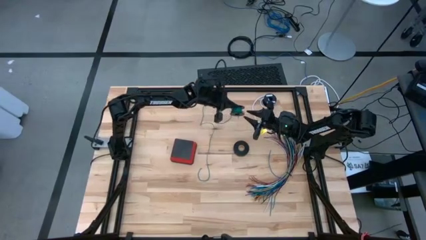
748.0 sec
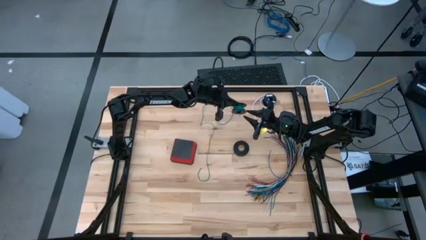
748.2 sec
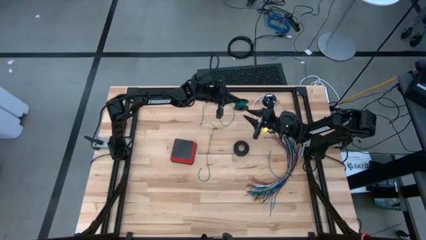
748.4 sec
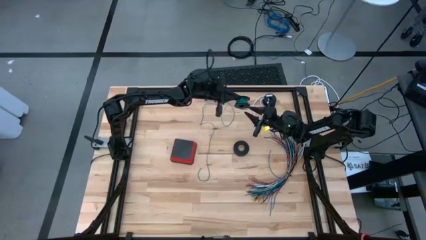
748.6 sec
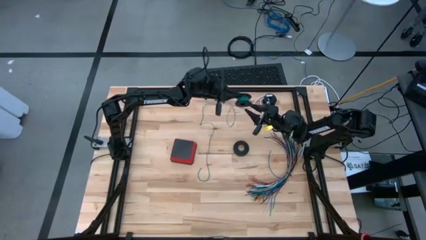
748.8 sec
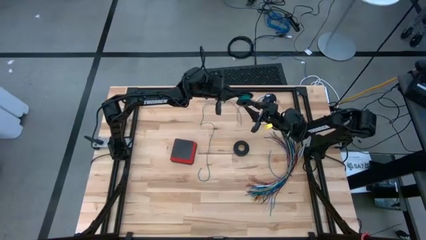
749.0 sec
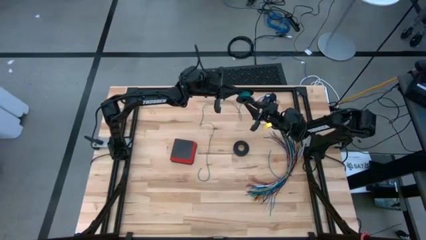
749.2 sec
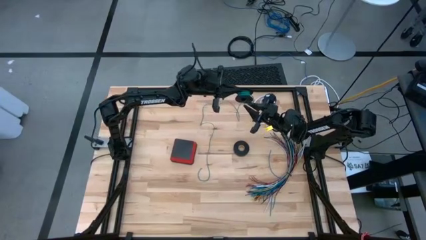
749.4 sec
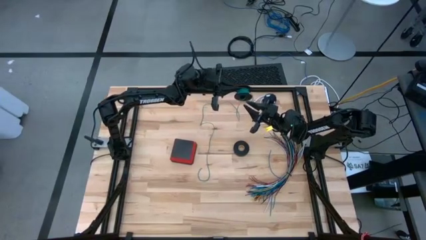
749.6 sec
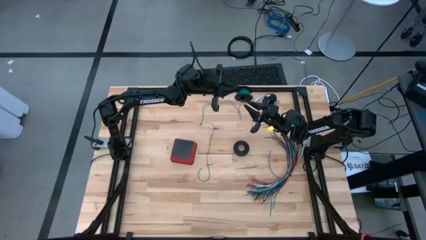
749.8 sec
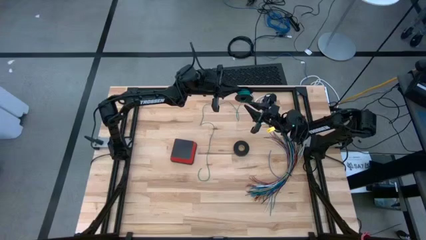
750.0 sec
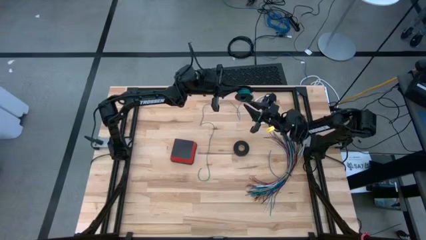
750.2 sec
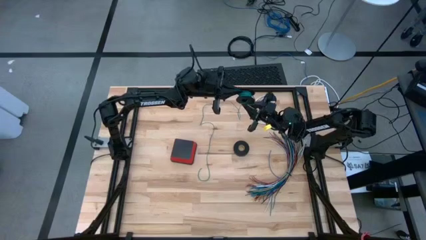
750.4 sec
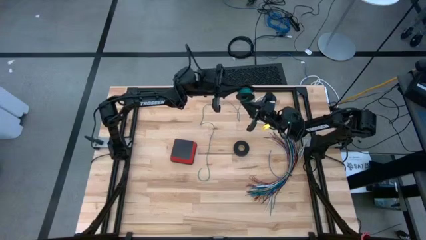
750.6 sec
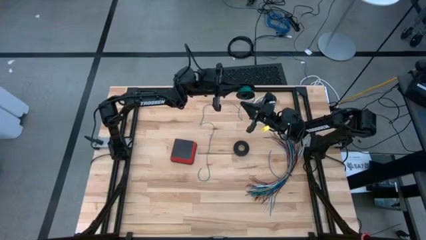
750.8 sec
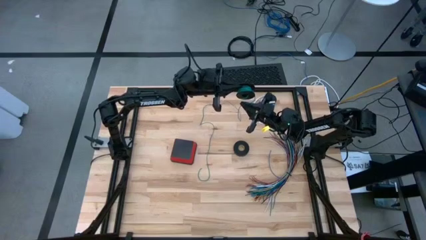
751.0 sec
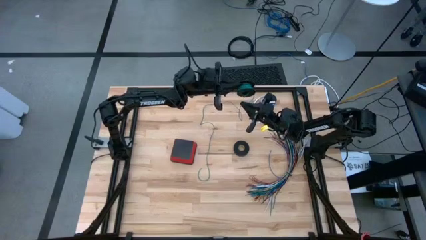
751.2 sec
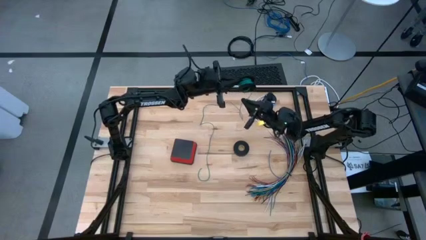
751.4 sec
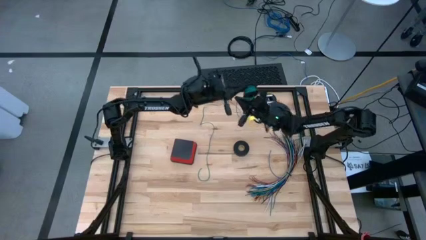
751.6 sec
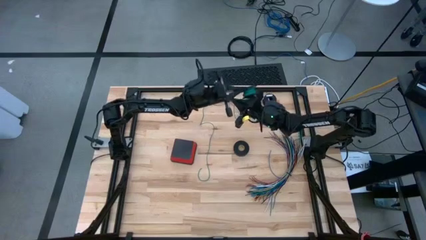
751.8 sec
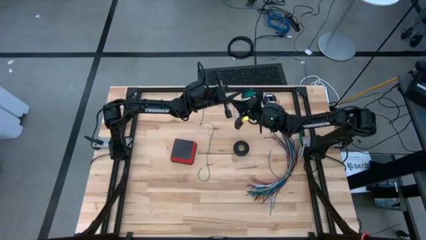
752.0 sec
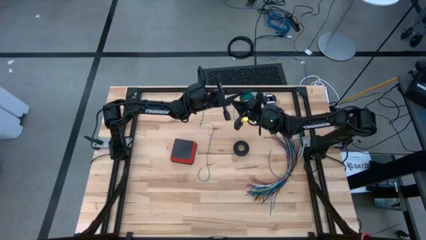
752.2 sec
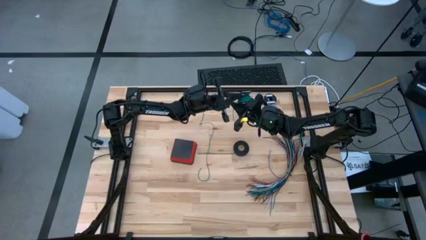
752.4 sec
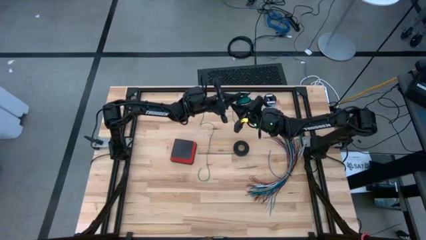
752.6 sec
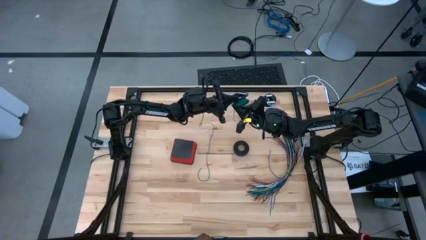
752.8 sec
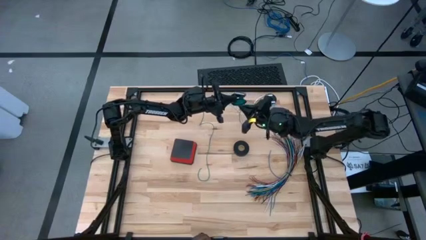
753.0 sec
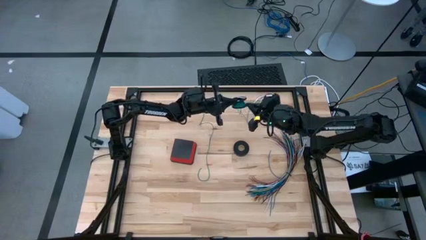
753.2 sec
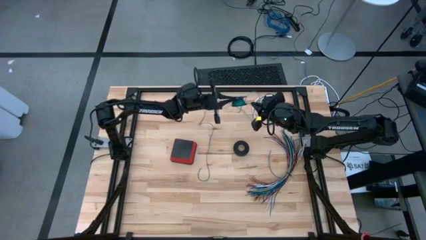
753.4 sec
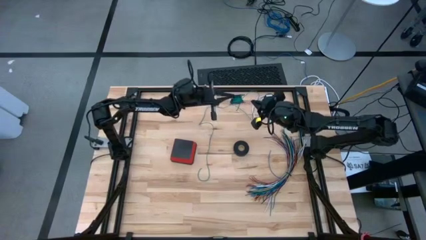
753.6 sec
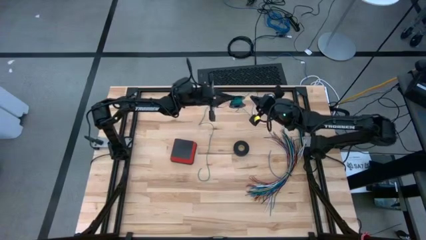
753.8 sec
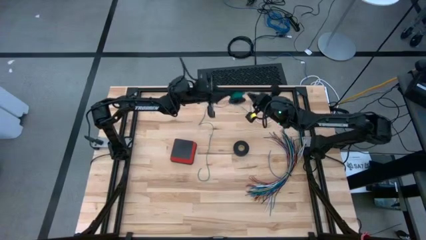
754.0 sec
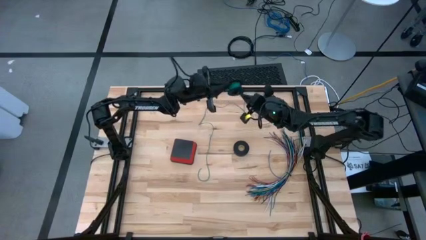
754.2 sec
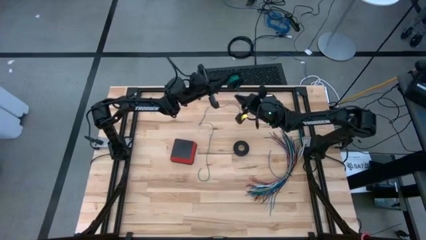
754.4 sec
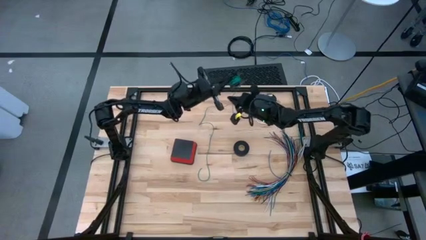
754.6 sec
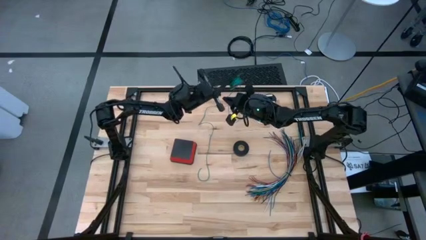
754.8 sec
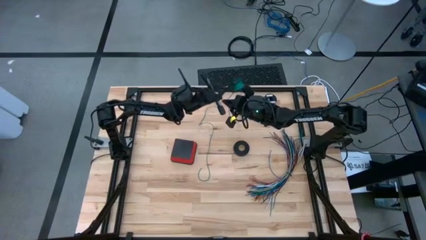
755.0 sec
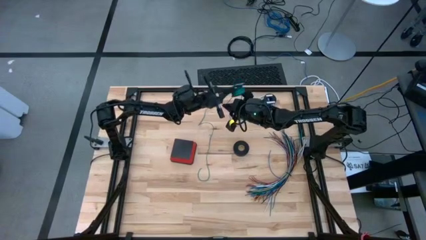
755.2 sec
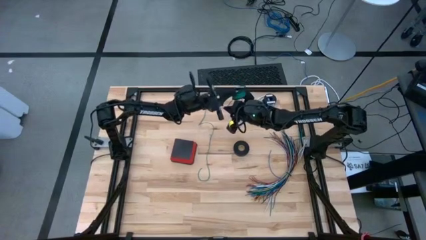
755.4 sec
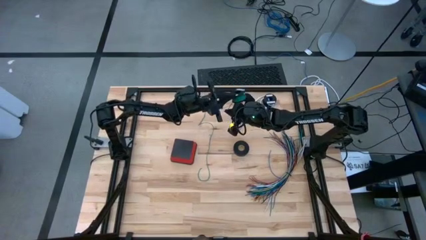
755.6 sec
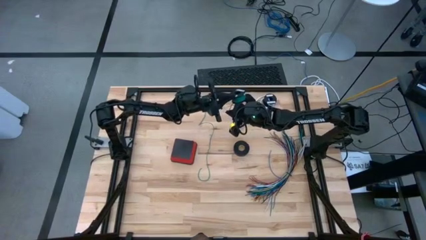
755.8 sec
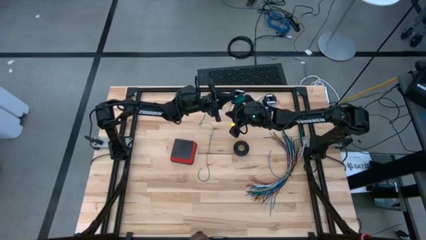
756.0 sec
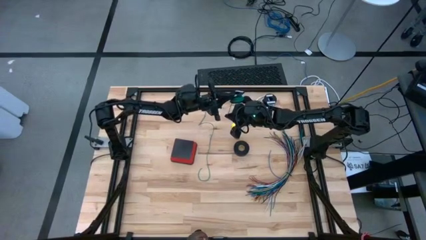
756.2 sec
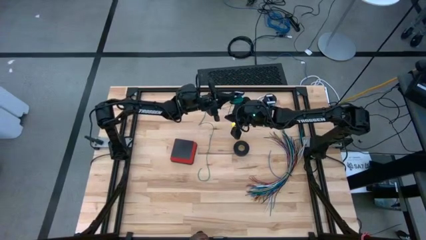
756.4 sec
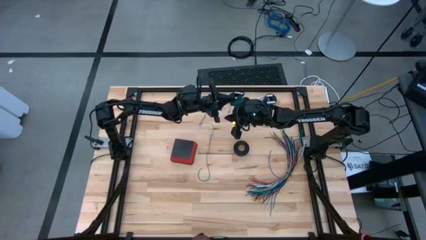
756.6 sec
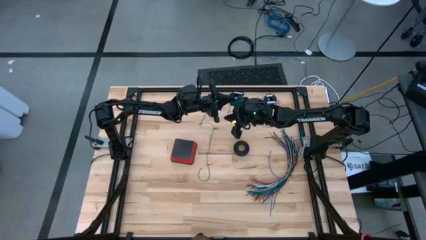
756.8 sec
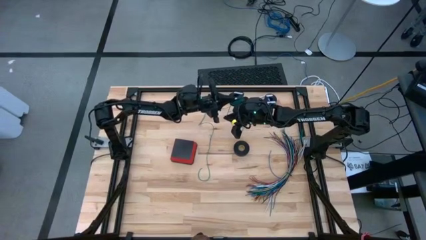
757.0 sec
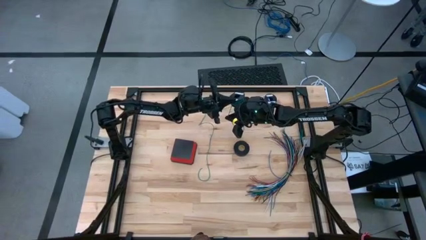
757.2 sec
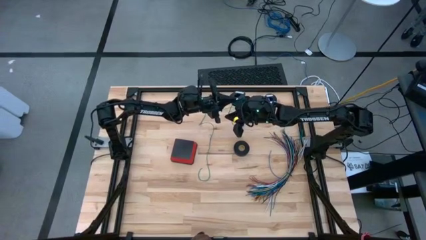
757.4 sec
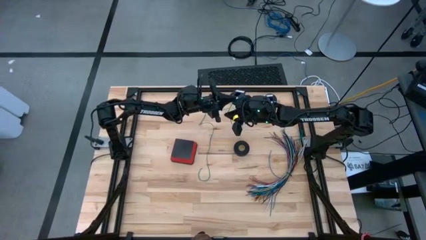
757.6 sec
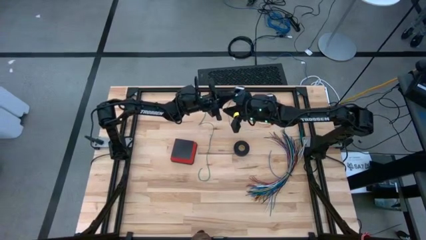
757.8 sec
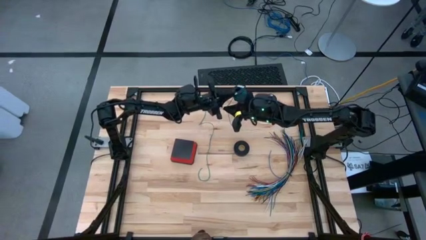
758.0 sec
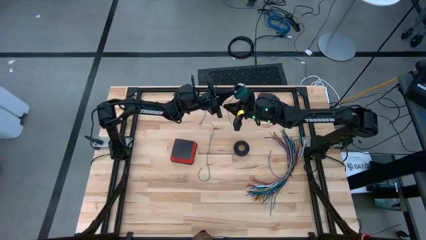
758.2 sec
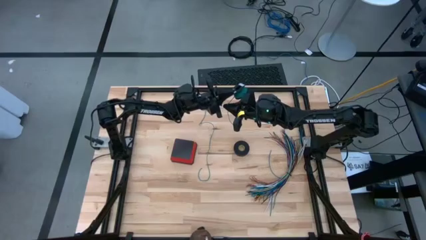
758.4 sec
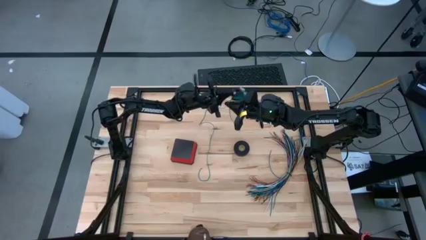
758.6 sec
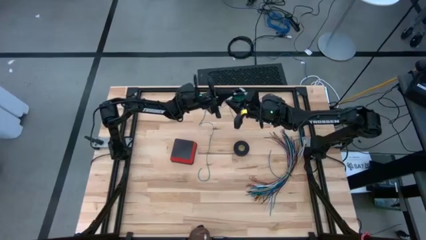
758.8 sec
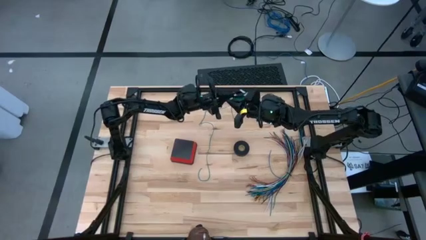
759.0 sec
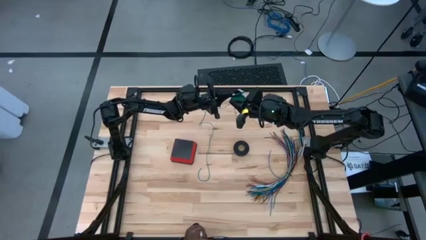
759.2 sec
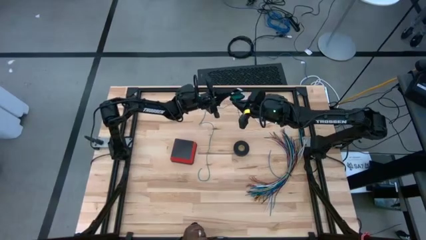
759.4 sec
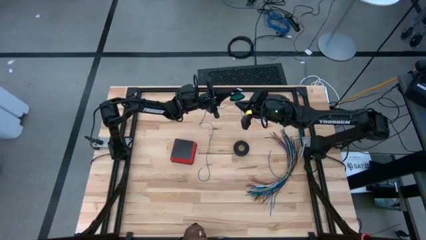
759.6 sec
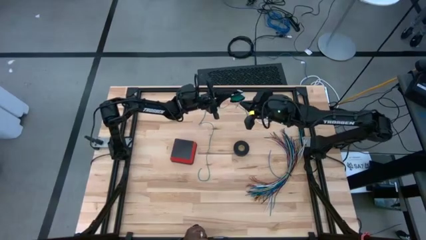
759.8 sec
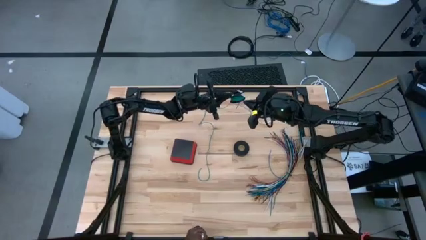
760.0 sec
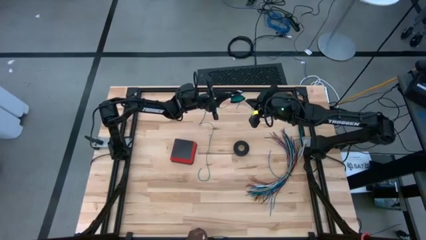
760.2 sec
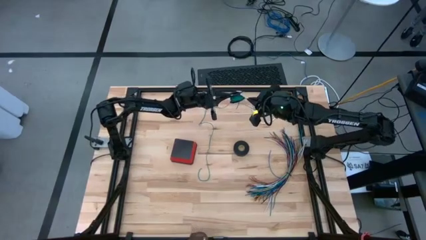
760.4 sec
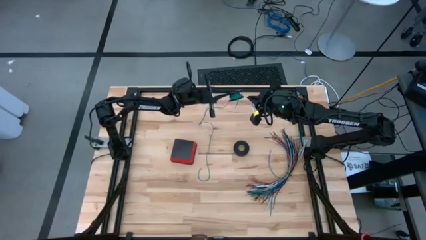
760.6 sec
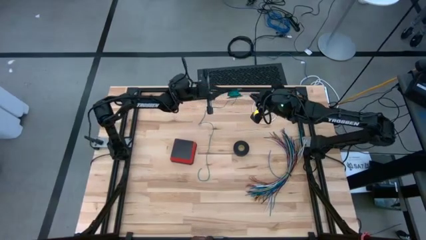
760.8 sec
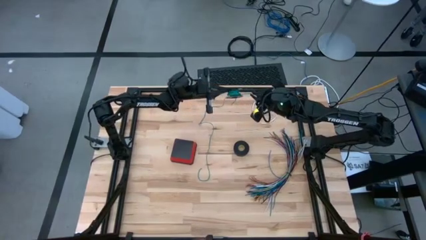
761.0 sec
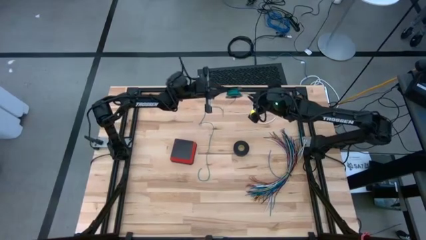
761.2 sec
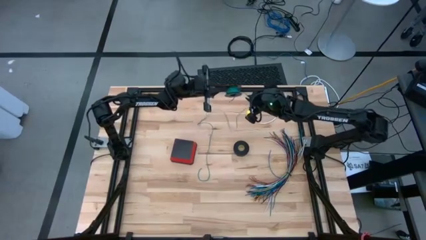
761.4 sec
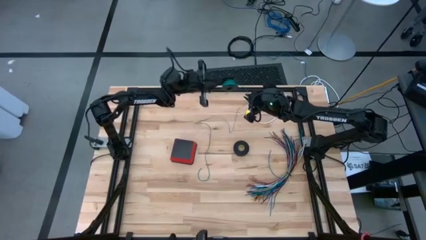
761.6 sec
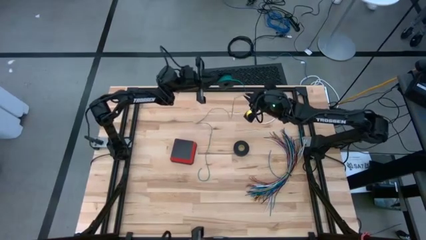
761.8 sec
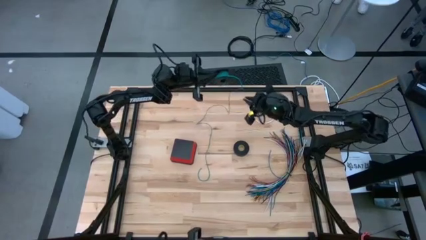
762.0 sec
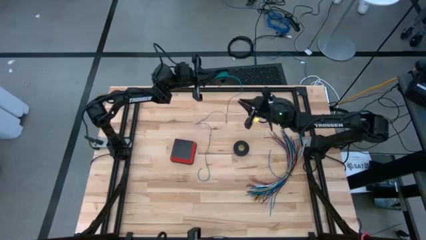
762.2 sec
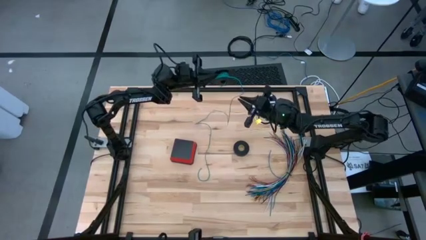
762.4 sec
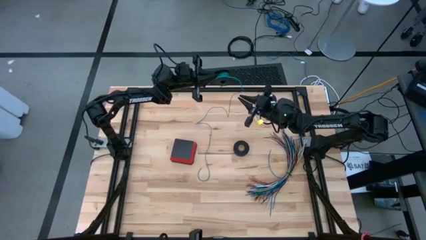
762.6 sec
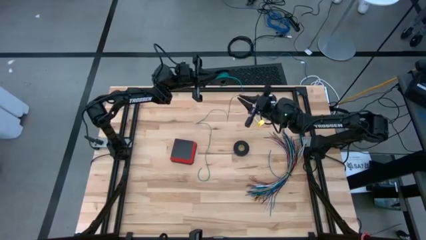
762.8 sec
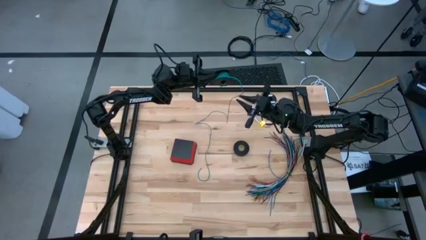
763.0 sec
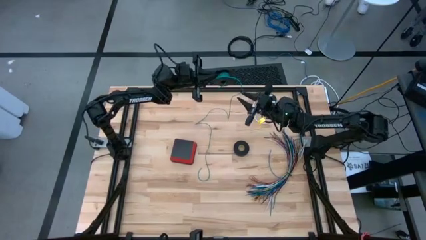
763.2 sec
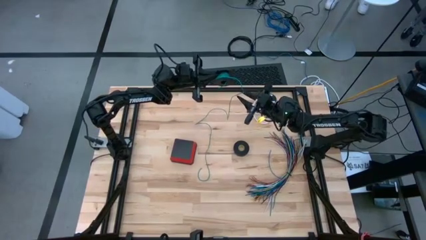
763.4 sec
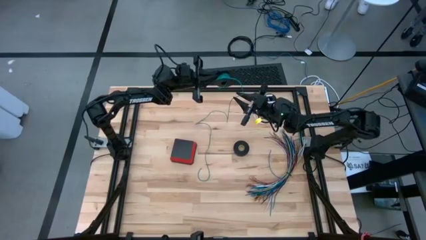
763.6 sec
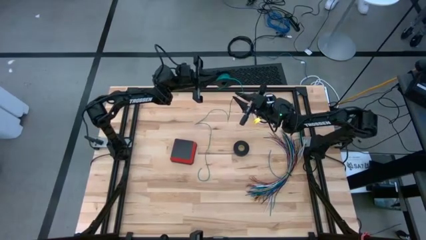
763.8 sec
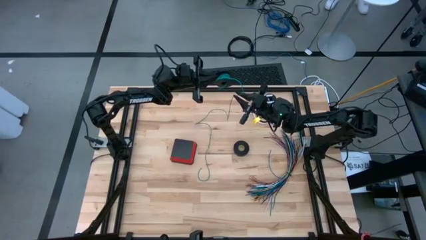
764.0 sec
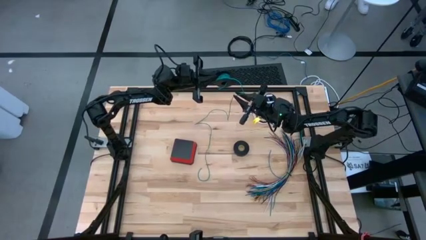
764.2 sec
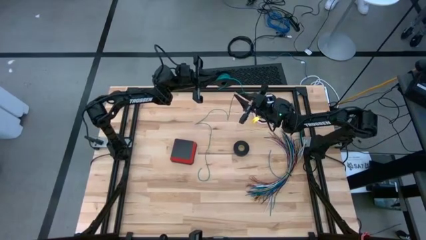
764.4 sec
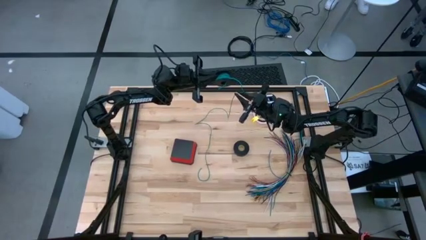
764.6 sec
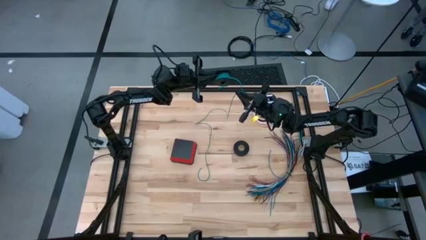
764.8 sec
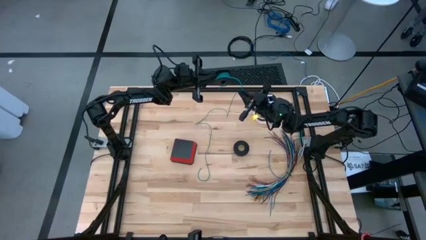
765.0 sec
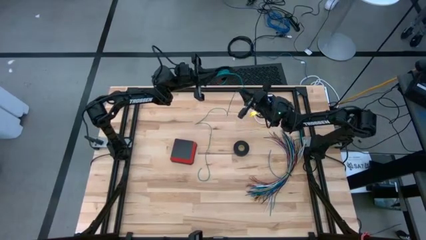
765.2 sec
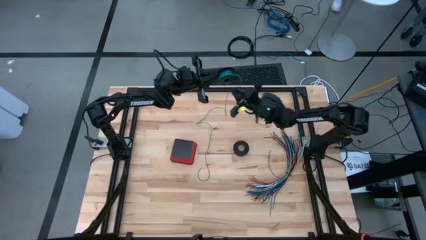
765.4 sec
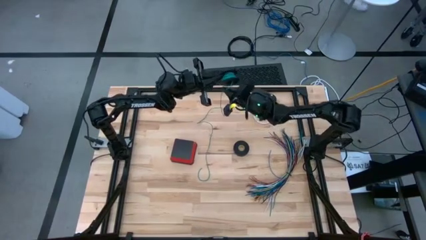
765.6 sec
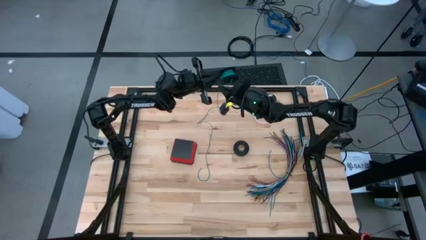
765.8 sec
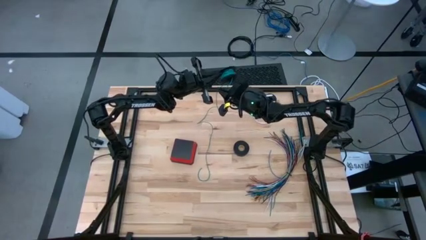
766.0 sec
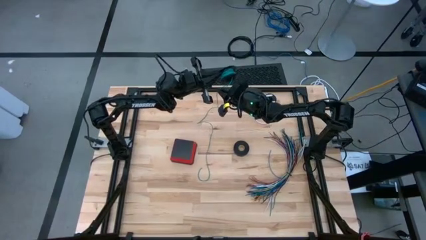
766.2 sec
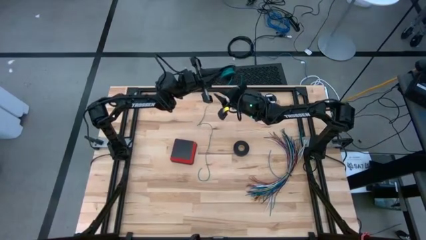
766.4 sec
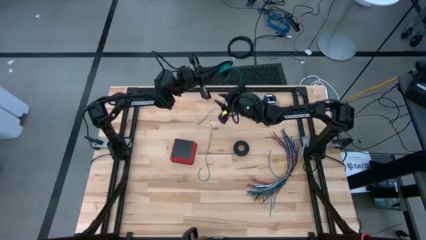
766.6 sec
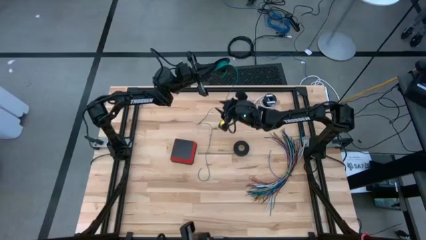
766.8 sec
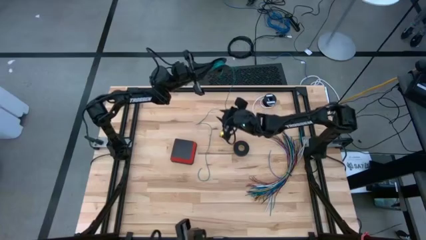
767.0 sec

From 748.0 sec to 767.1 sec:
Task: Coiling cords
Coil the green wire cable on the spool
